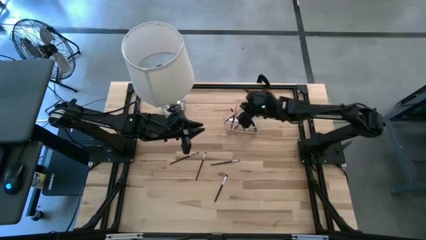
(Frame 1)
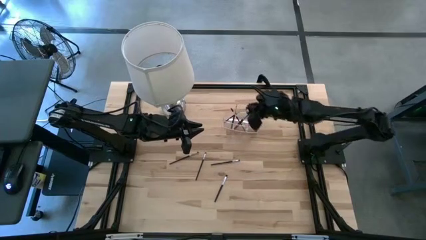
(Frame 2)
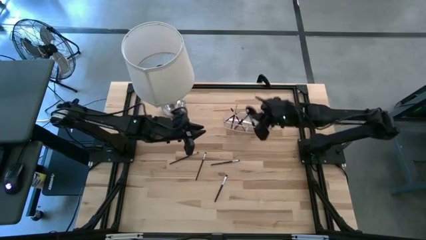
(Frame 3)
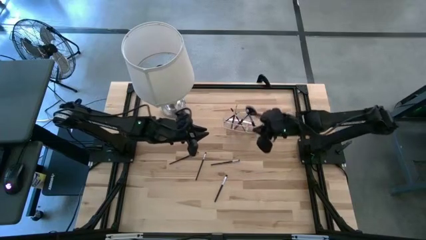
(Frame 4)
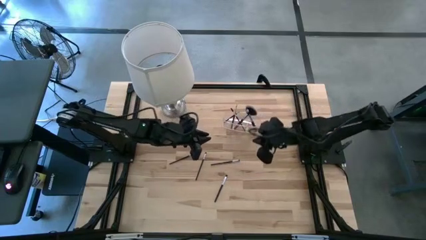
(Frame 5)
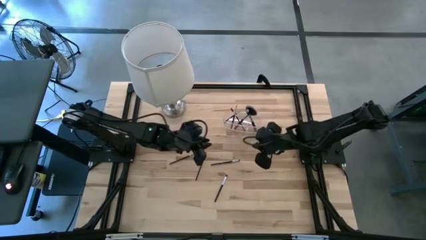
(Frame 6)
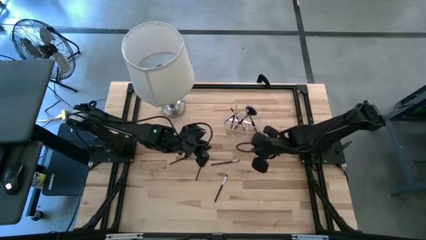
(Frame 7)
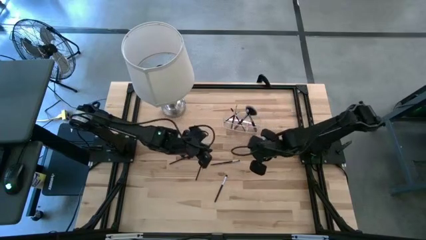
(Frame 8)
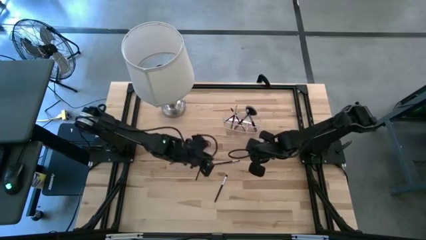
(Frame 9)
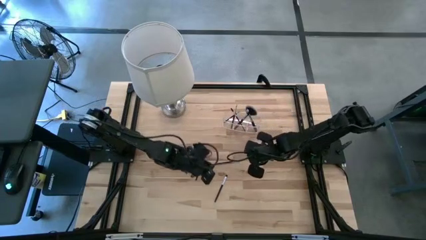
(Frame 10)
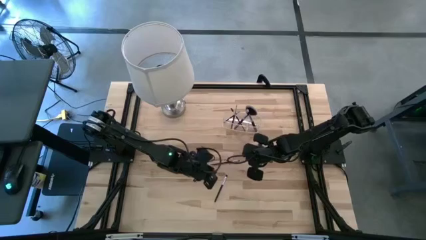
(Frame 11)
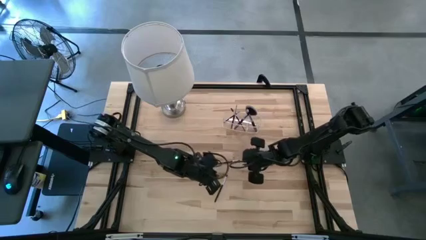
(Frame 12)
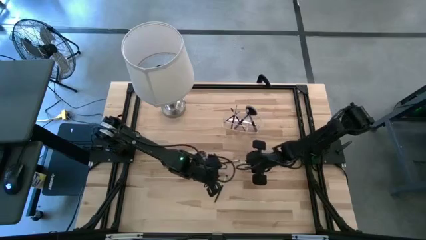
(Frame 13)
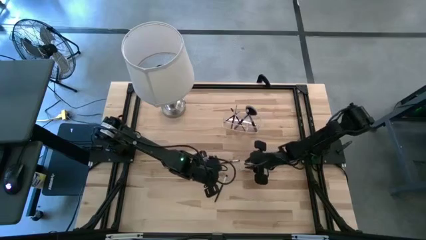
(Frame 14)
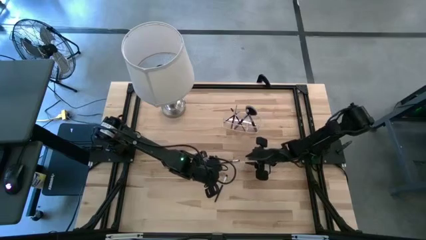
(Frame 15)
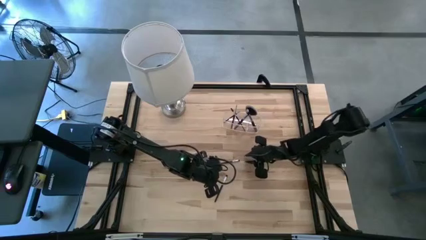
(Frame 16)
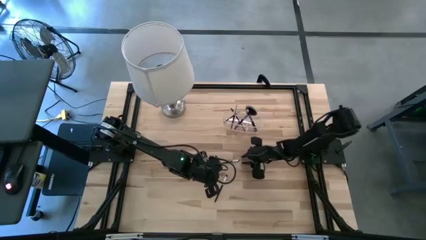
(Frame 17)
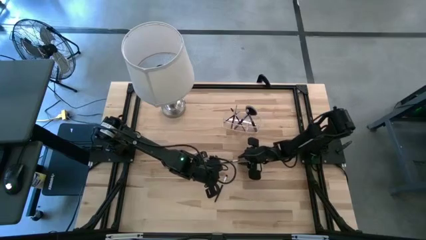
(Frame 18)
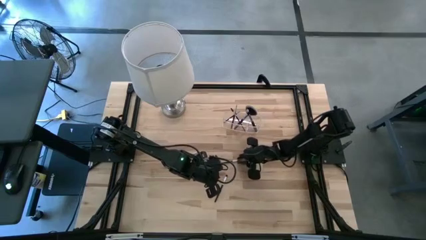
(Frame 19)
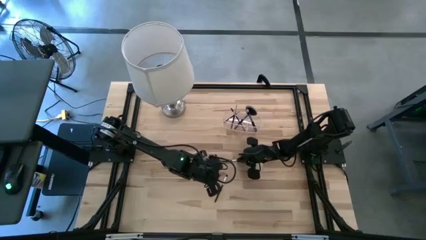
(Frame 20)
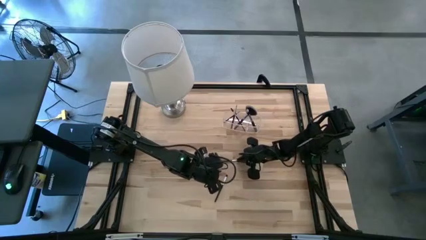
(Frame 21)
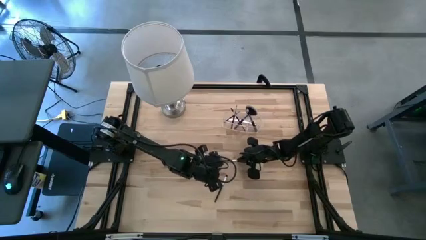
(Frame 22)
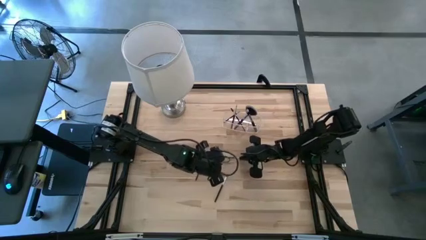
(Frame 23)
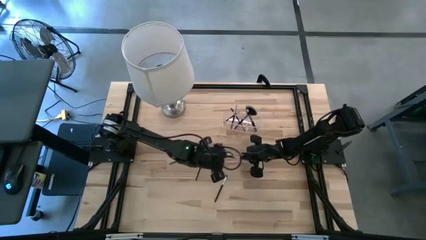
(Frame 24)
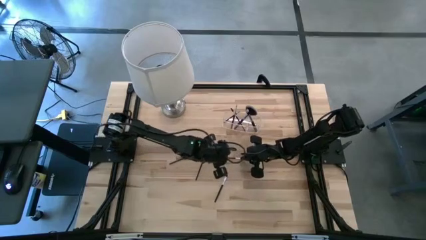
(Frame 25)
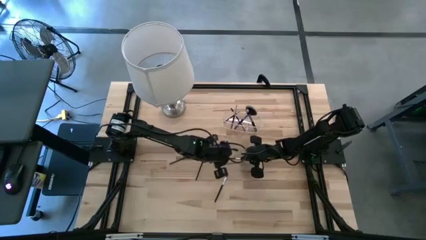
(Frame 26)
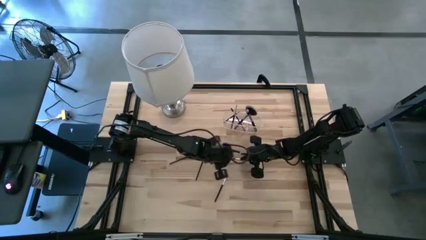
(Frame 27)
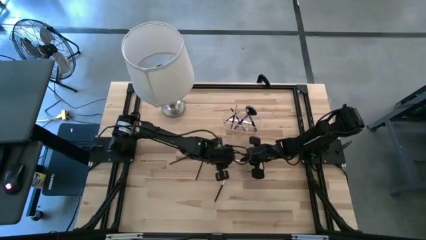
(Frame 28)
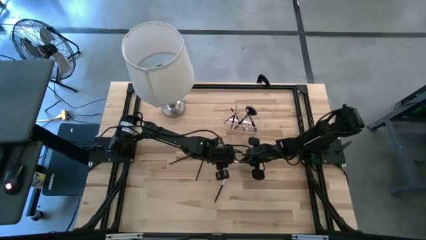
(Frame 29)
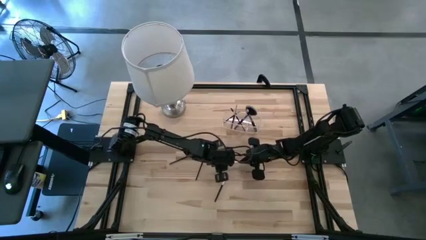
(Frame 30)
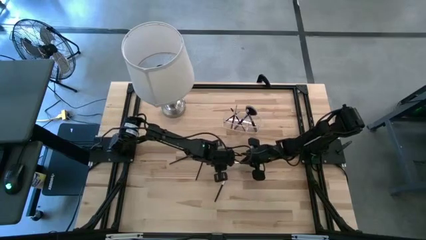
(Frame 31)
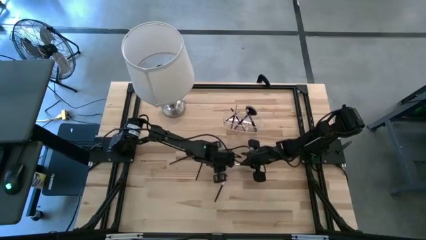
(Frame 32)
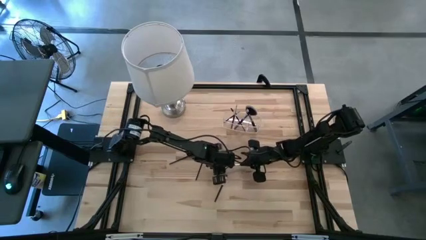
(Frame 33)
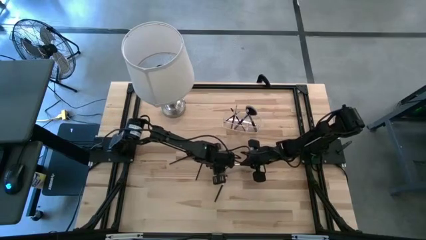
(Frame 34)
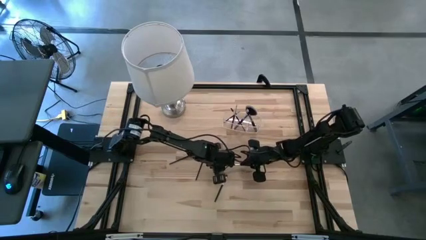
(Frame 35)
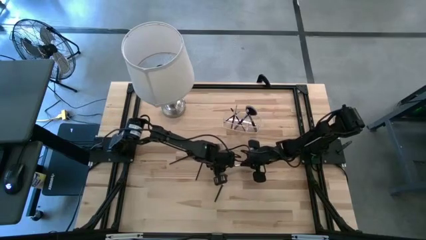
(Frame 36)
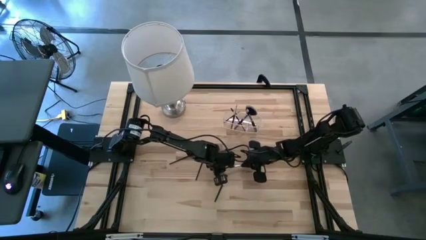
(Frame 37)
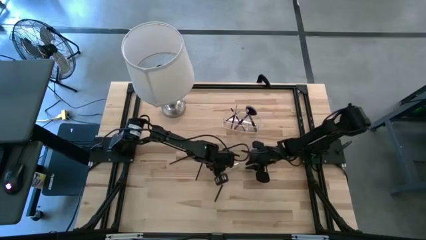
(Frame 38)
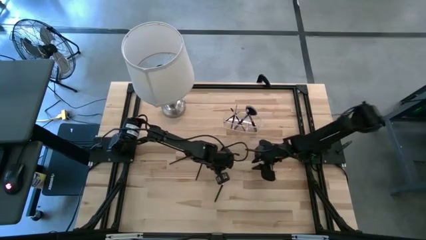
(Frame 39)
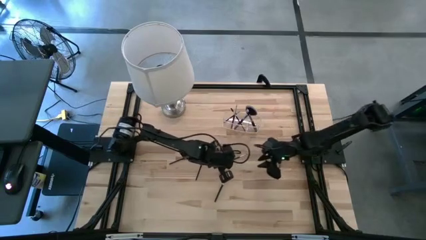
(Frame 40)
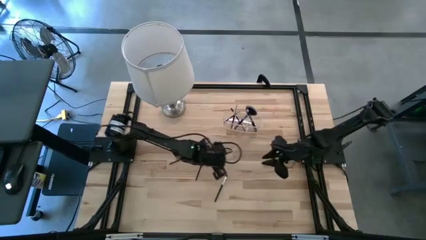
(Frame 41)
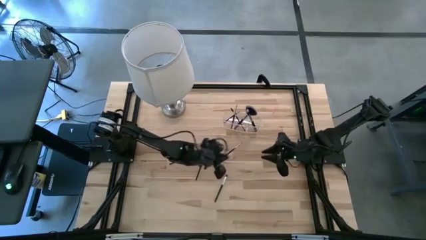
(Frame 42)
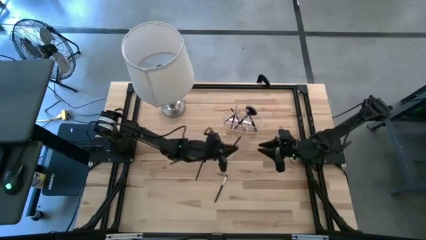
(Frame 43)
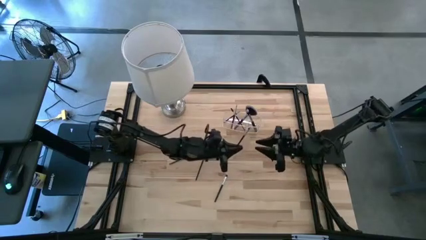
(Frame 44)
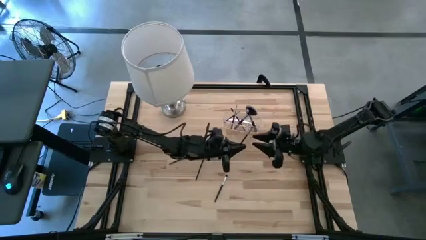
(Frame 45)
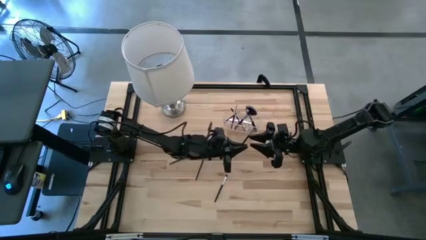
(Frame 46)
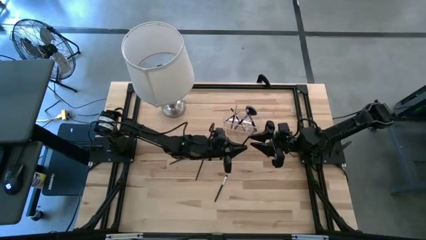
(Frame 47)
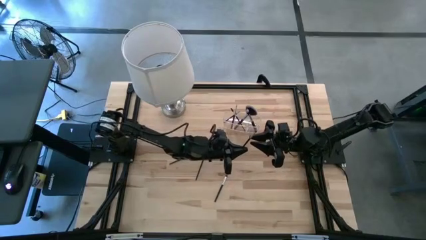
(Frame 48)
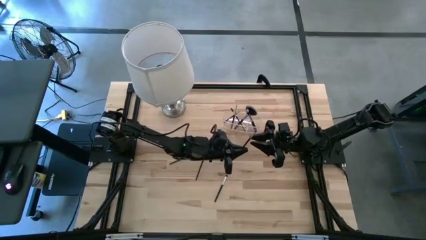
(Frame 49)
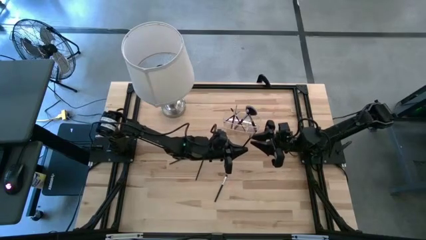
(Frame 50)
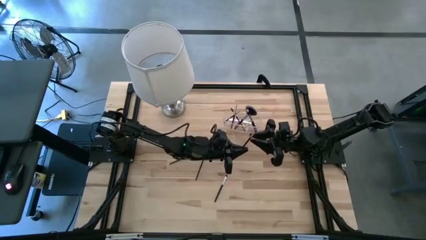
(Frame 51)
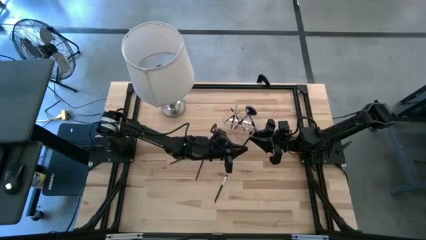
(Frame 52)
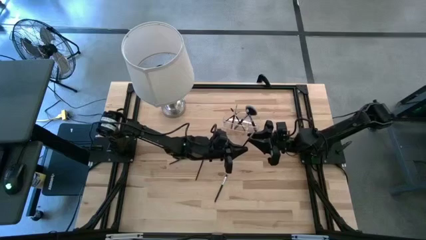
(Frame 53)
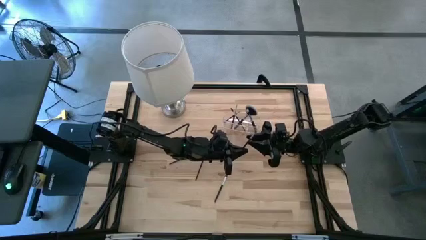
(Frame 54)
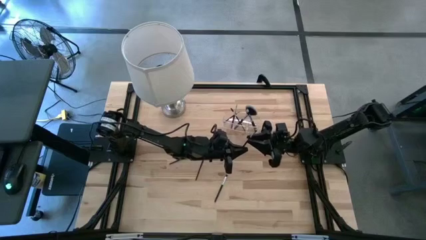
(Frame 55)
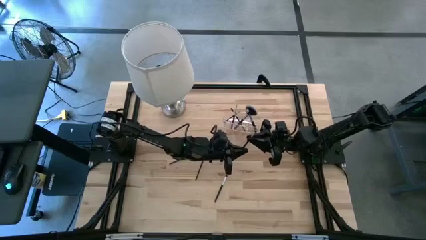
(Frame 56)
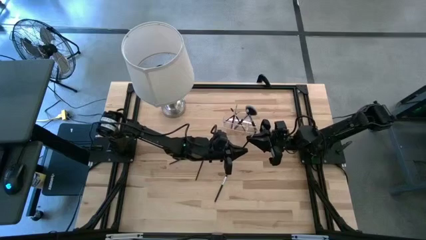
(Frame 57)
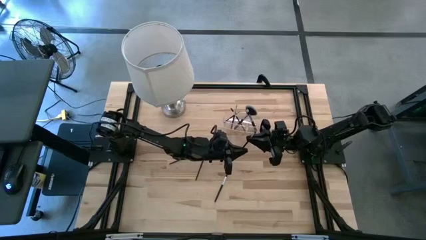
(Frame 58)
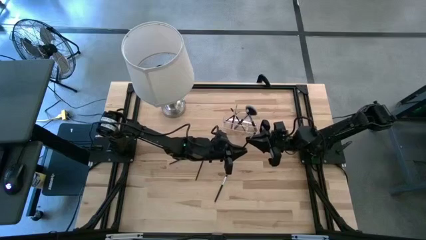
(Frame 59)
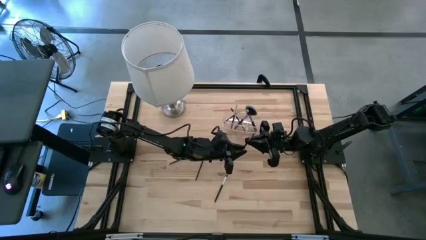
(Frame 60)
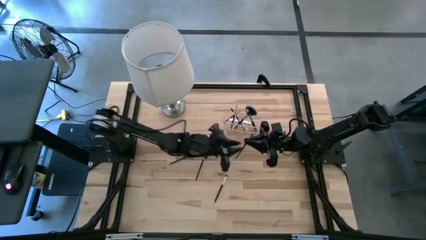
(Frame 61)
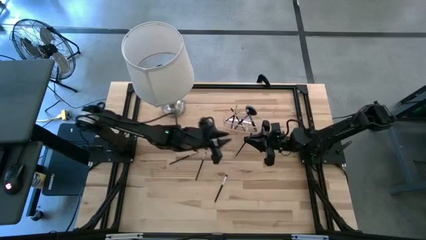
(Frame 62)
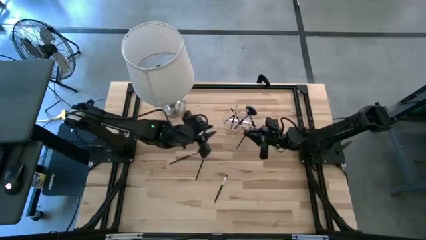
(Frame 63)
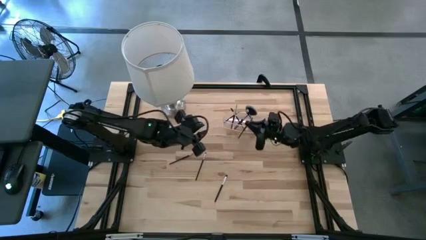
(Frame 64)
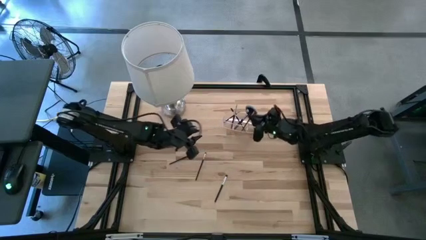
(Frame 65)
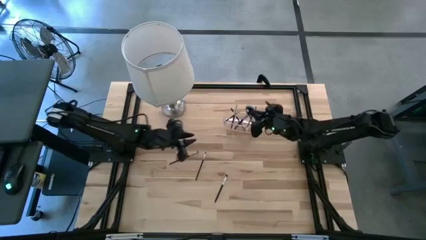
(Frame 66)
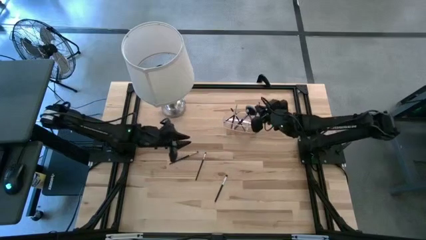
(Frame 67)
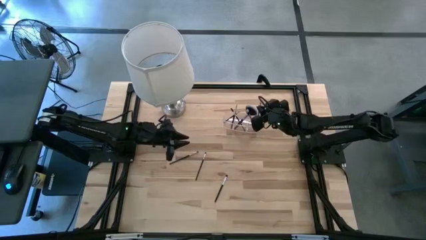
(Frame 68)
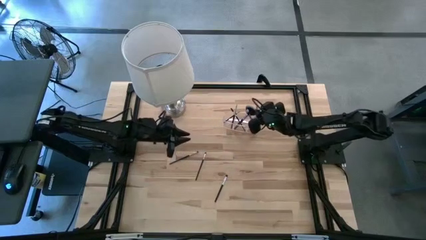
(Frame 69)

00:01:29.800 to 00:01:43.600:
Task: Pick & Place Makeup Supplies
Put the makeup brush into the transparent organizer
